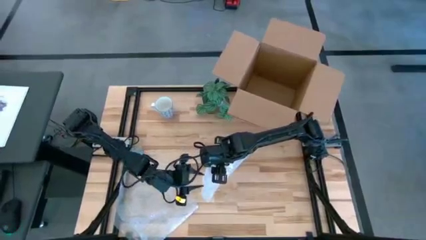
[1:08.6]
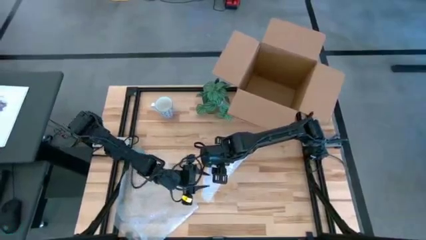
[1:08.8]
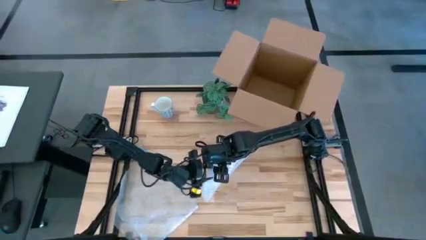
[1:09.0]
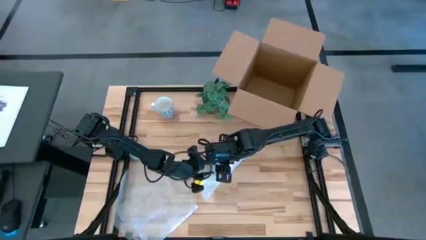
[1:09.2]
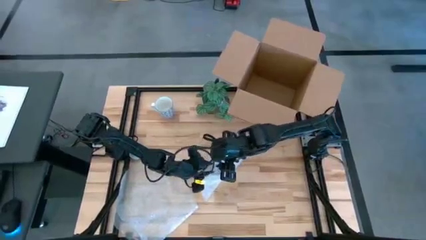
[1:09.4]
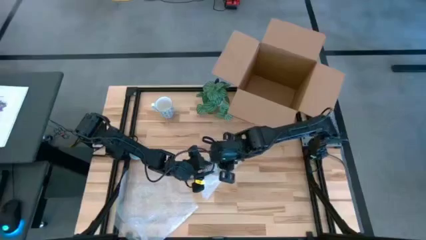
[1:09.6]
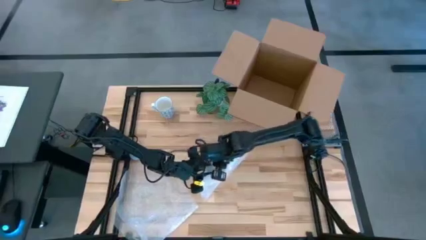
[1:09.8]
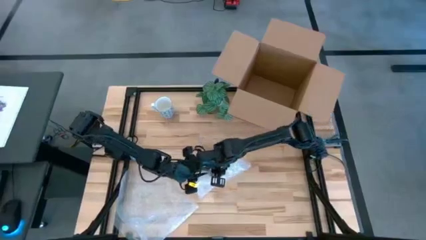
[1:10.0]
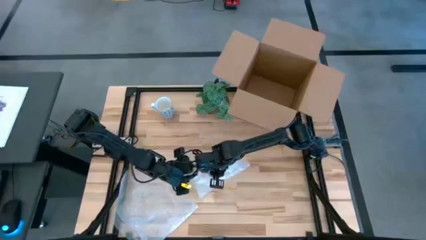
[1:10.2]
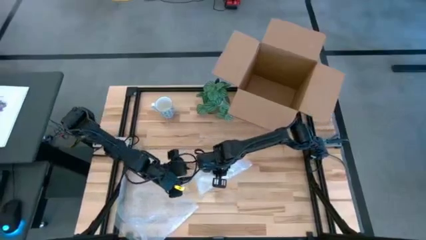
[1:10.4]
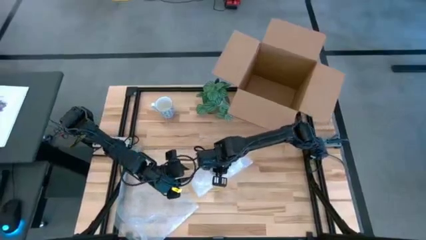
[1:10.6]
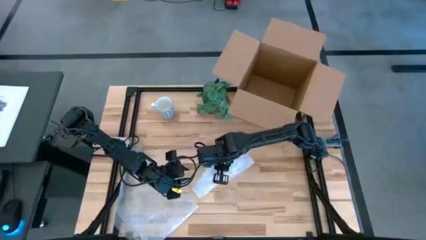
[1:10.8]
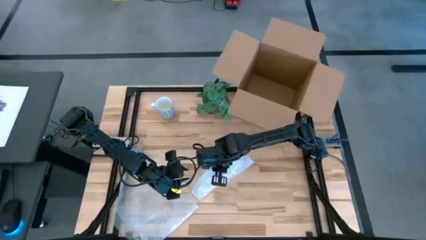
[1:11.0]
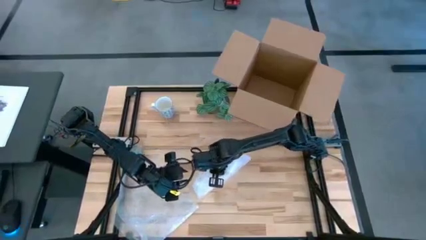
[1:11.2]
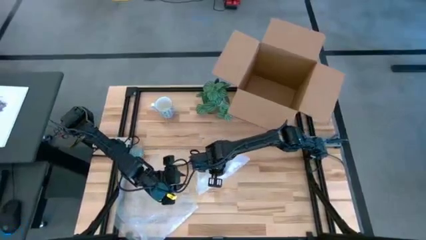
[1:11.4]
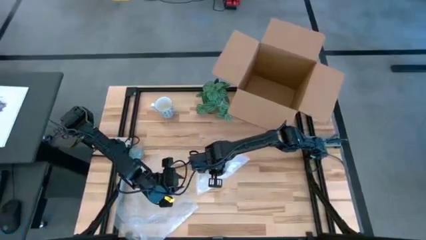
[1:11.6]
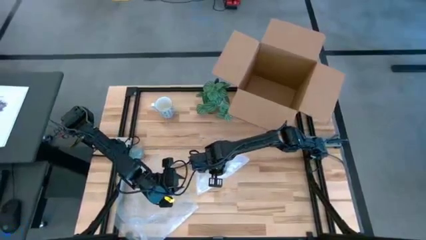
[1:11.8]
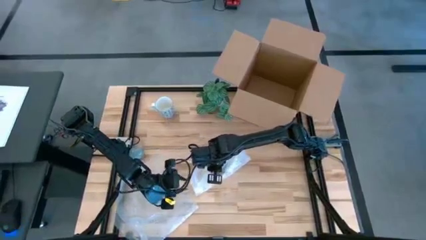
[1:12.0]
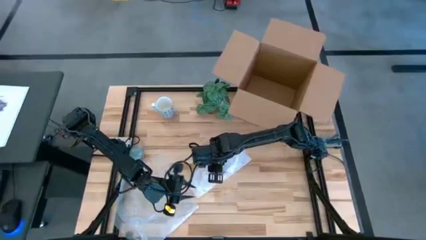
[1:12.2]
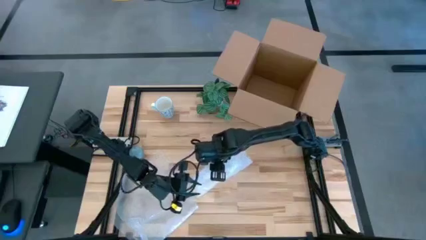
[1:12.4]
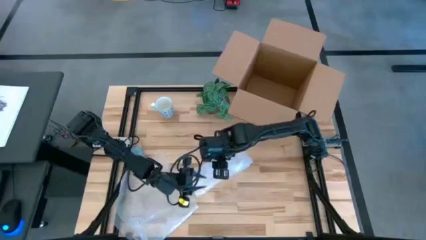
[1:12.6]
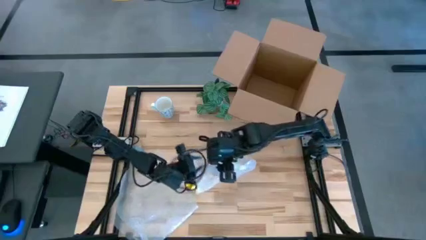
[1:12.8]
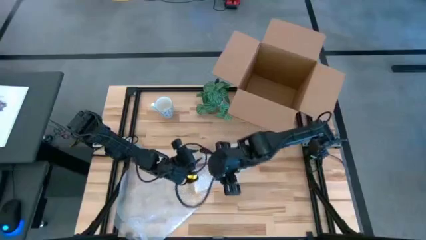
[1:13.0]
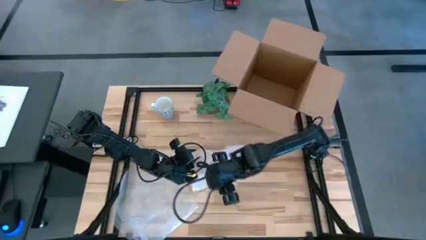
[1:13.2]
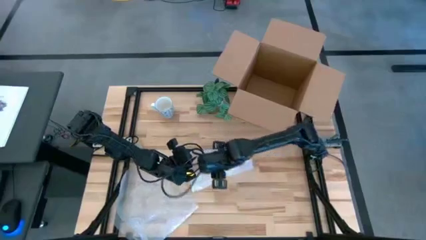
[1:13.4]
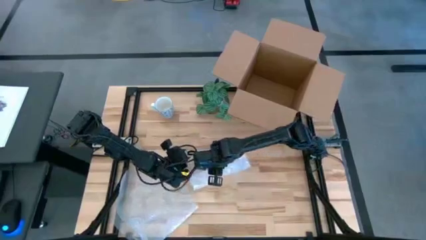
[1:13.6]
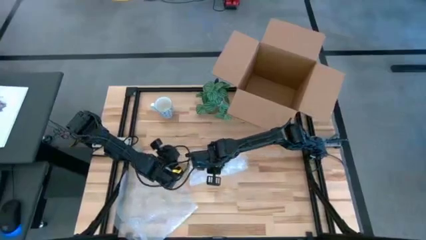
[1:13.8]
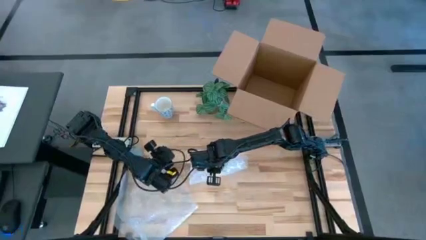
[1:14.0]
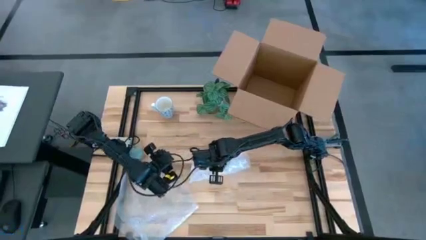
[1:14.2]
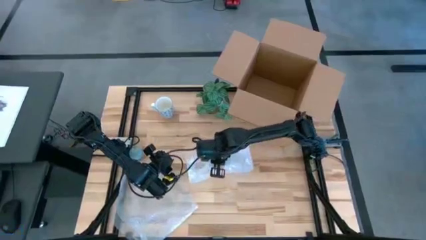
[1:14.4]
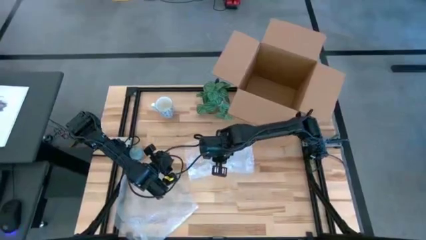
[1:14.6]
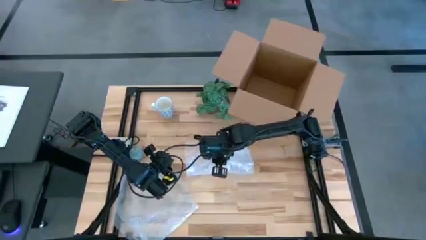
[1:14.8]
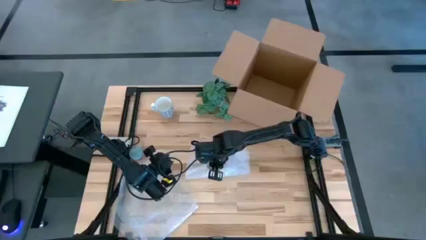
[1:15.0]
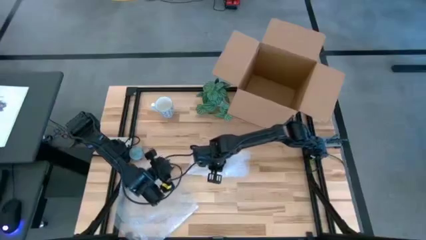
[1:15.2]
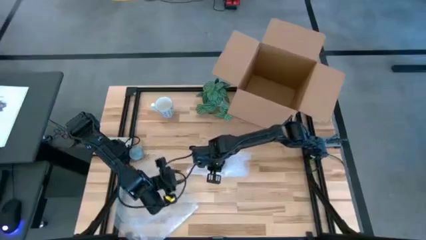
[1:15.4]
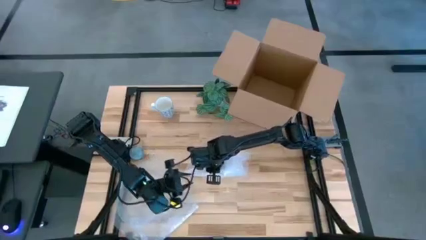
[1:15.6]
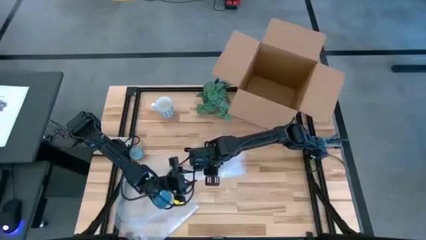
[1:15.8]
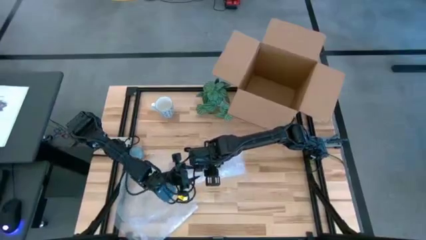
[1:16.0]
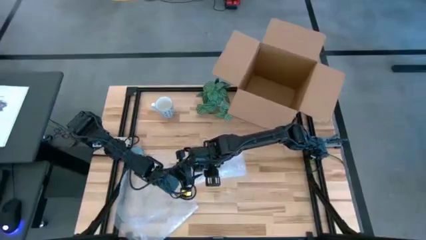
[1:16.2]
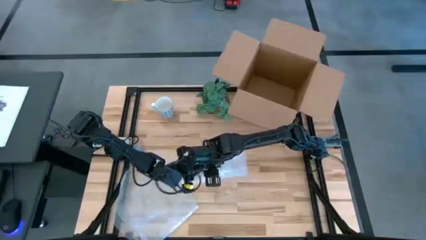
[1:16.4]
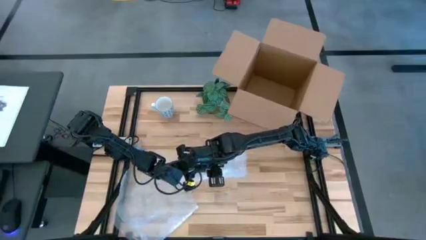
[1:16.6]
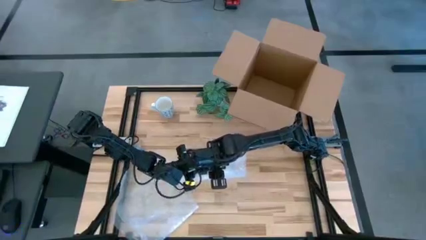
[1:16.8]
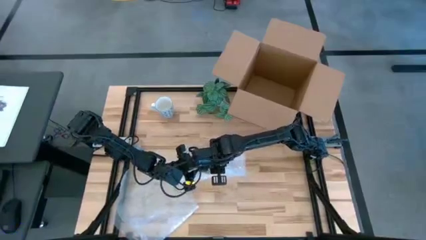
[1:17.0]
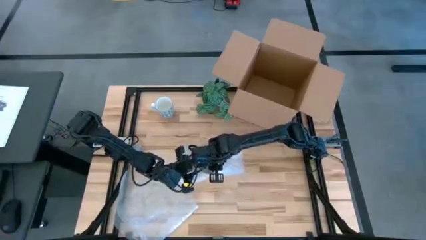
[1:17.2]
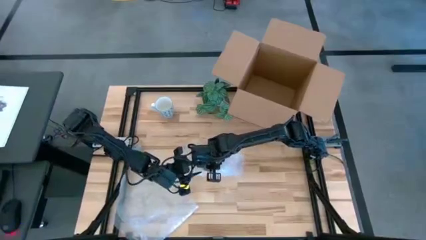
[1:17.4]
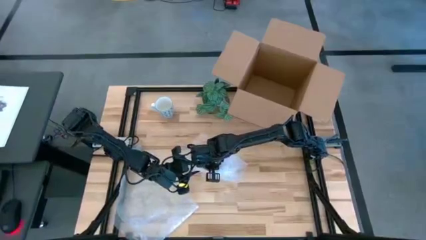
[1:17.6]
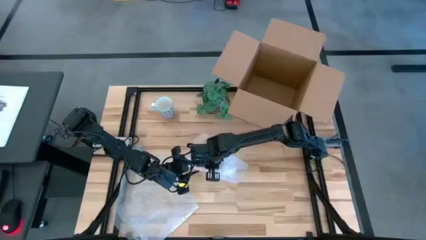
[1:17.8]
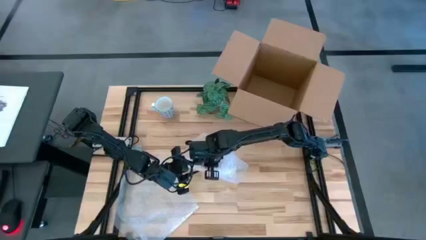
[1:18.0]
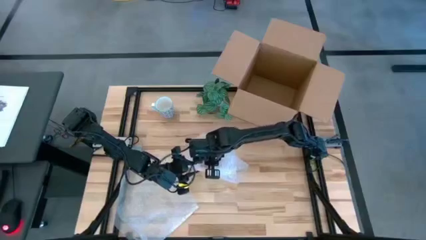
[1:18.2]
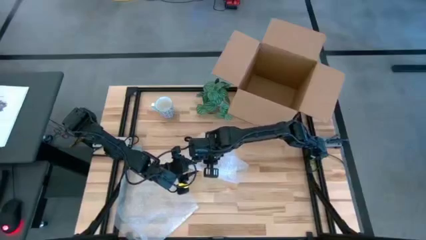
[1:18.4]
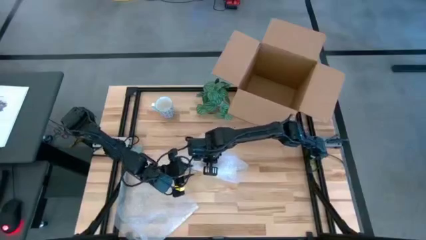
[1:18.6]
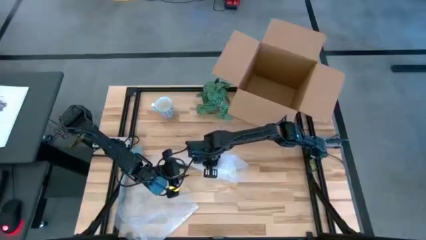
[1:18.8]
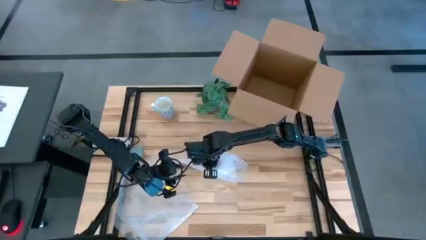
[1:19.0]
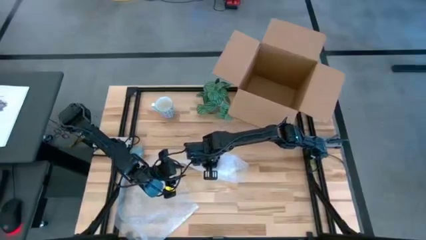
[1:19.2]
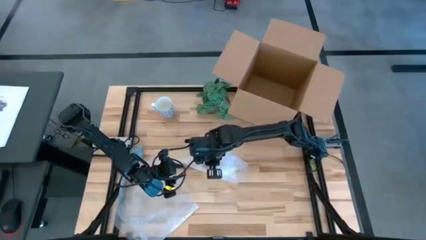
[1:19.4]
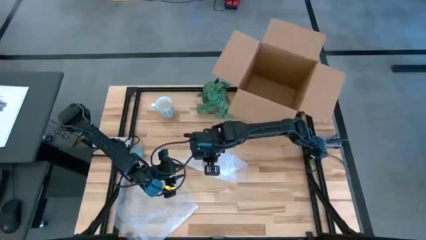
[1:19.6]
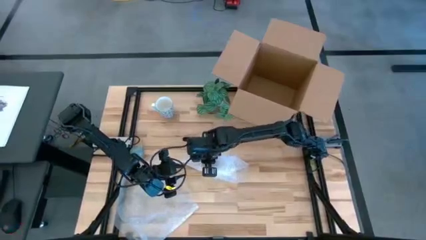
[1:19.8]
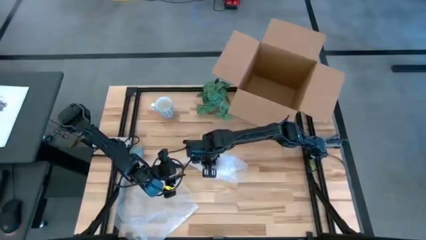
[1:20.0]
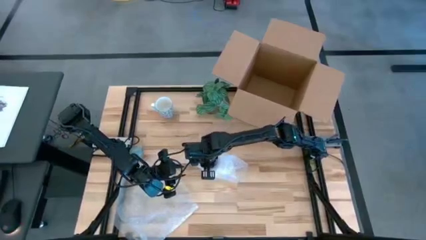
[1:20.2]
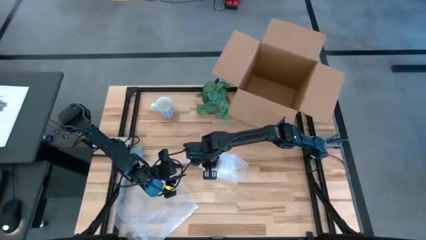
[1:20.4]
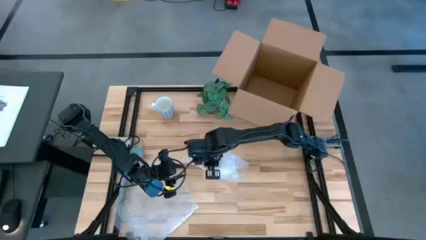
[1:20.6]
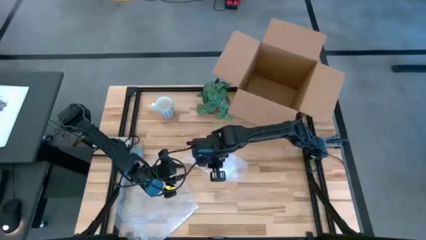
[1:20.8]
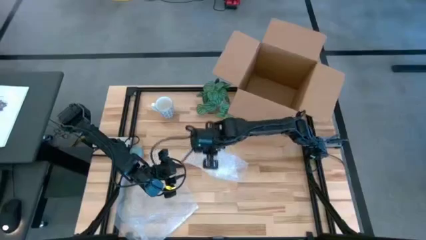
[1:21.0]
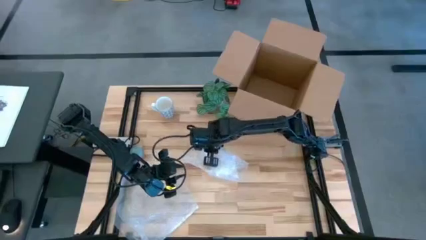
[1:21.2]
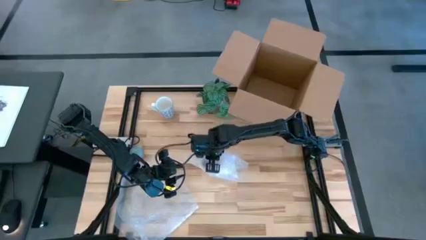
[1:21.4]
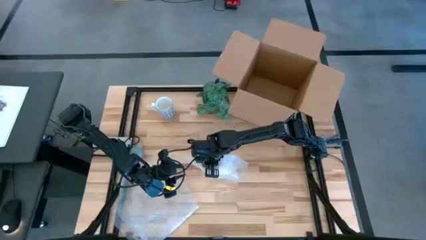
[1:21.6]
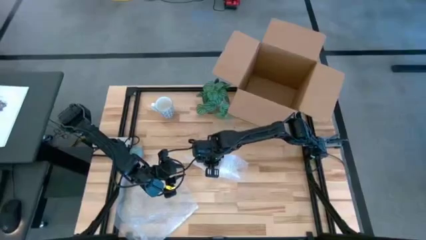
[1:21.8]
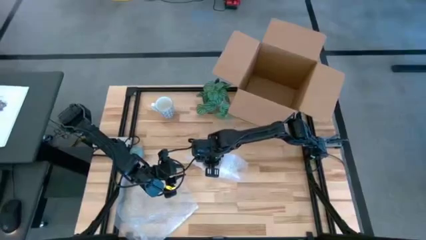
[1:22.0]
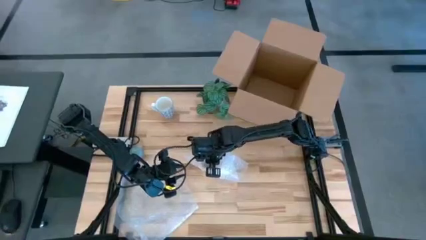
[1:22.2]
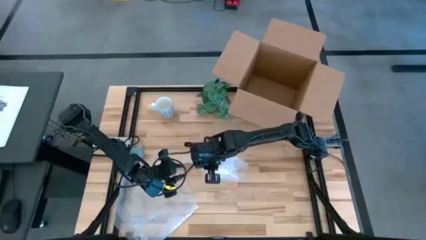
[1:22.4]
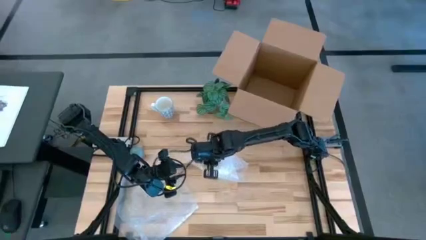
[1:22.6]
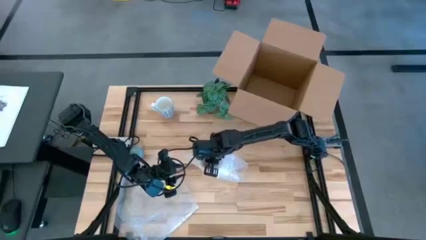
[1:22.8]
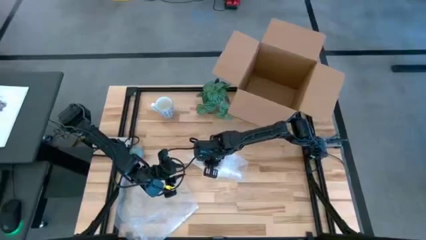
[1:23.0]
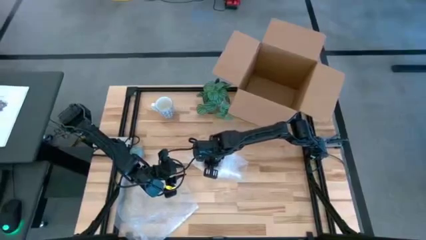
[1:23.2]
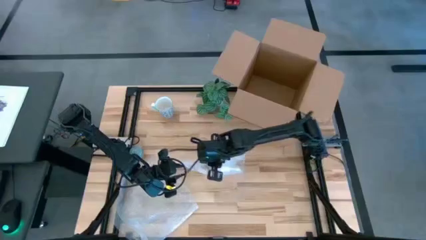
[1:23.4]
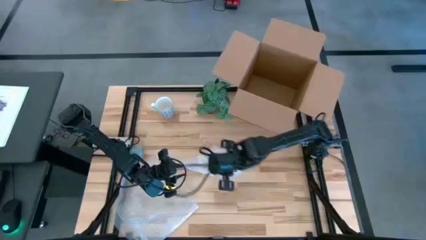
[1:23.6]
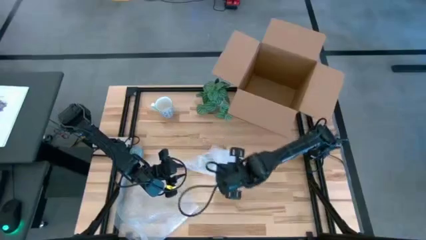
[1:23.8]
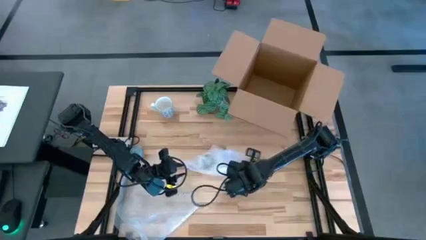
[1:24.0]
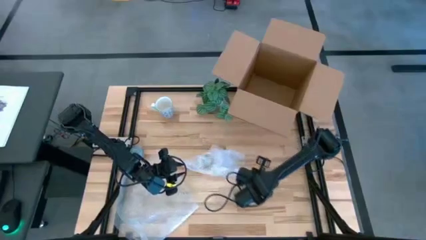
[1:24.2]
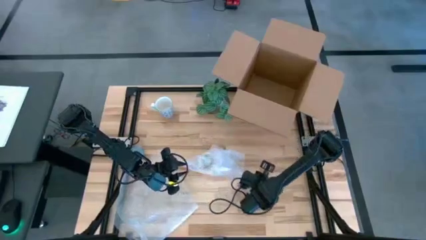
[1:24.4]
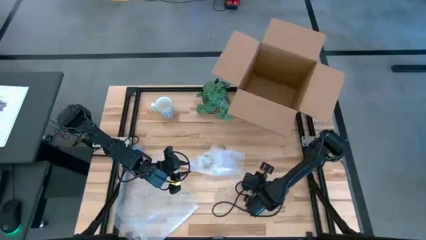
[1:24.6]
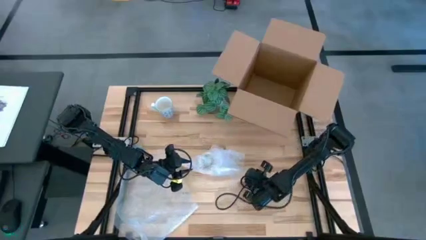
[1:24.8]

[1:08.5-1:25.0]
Task: wrap mug
Wrap the yellow mug
